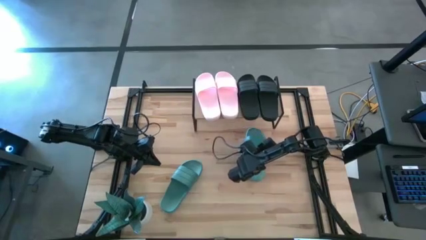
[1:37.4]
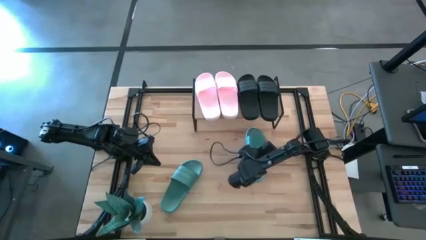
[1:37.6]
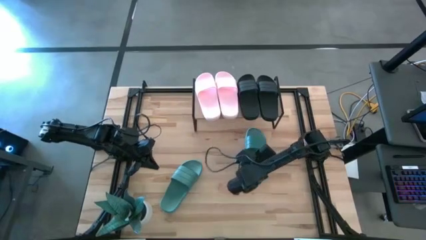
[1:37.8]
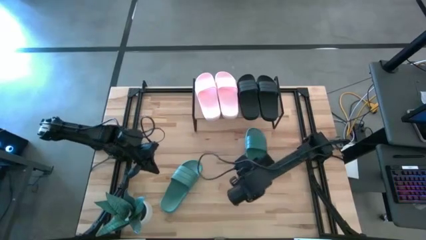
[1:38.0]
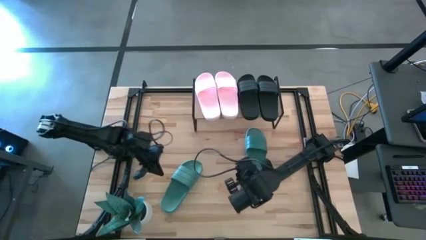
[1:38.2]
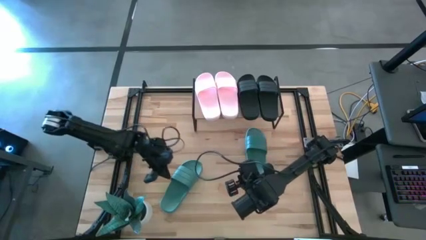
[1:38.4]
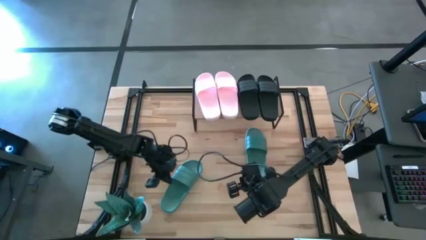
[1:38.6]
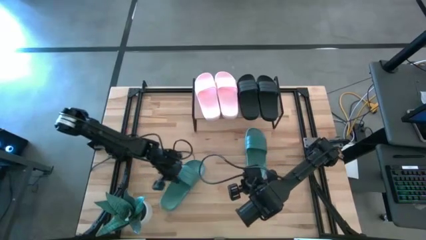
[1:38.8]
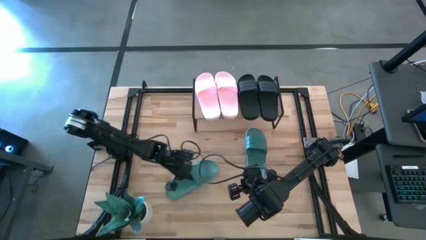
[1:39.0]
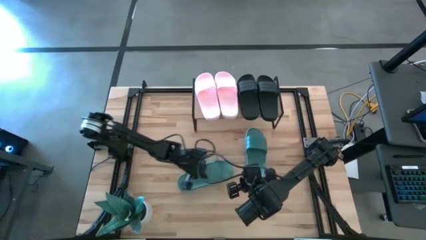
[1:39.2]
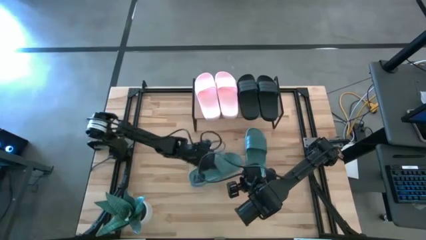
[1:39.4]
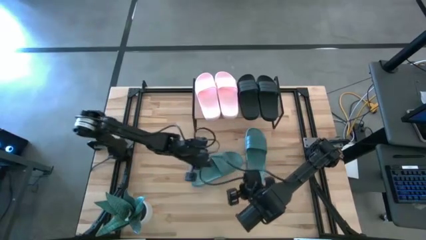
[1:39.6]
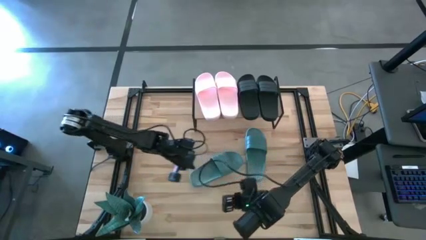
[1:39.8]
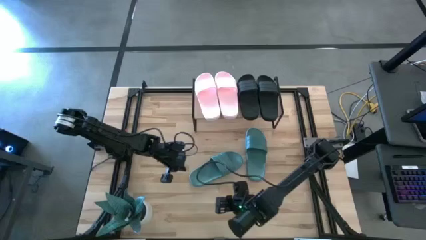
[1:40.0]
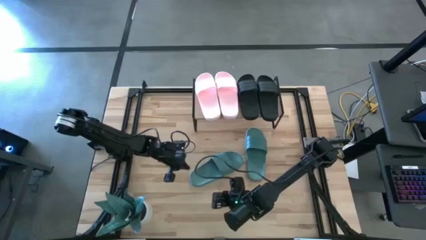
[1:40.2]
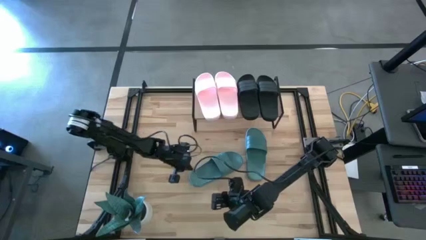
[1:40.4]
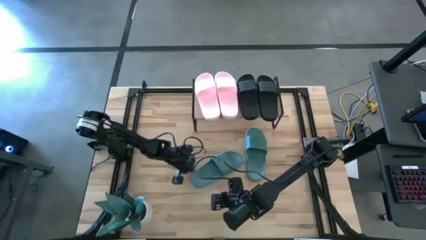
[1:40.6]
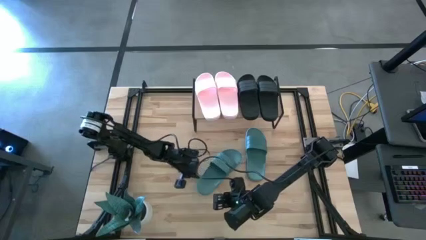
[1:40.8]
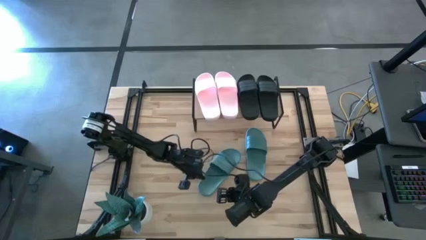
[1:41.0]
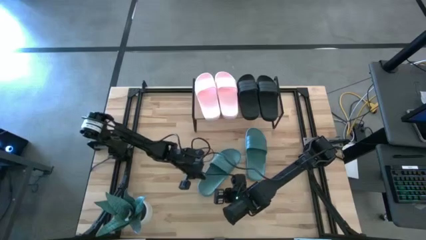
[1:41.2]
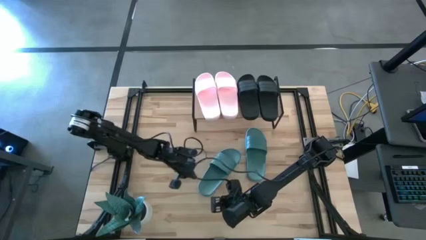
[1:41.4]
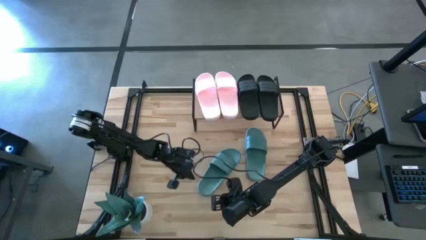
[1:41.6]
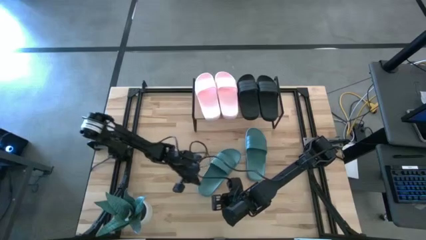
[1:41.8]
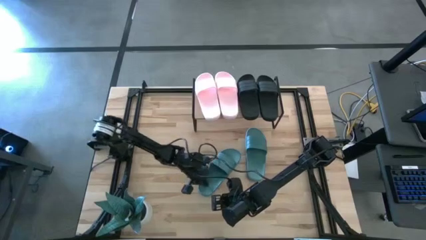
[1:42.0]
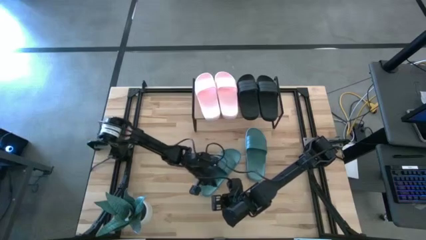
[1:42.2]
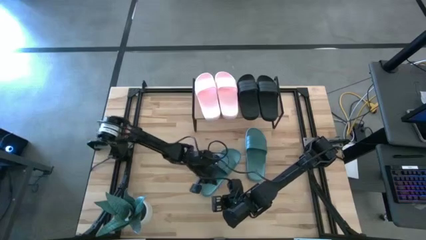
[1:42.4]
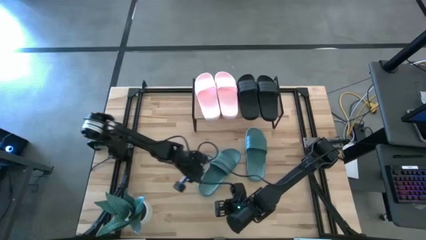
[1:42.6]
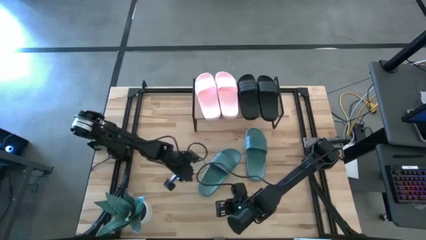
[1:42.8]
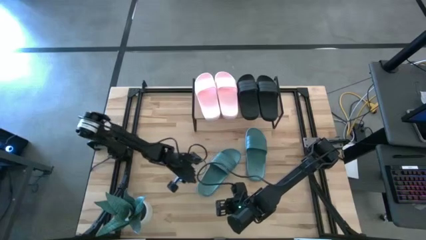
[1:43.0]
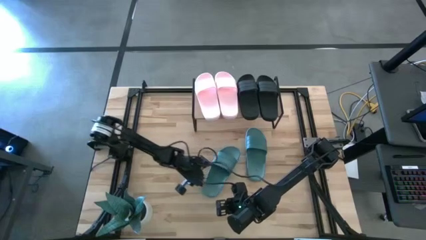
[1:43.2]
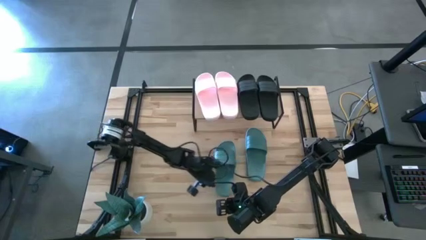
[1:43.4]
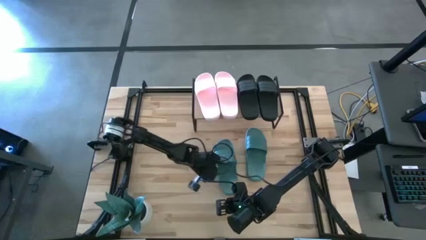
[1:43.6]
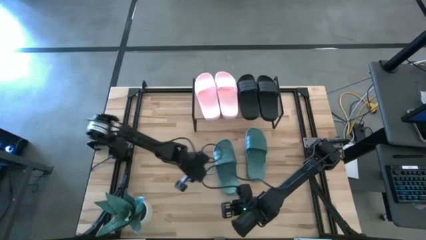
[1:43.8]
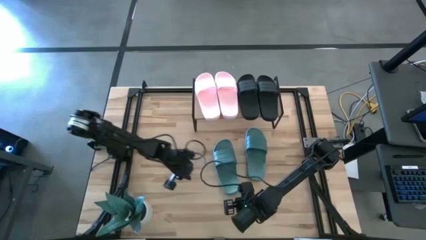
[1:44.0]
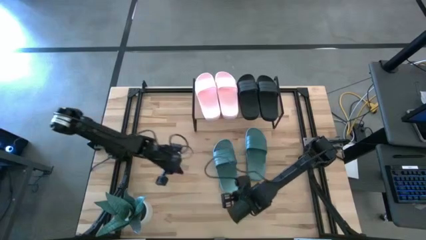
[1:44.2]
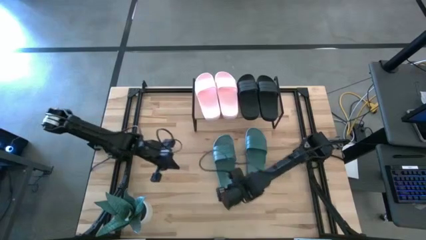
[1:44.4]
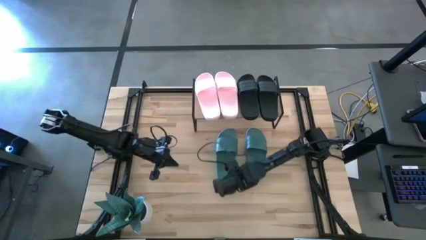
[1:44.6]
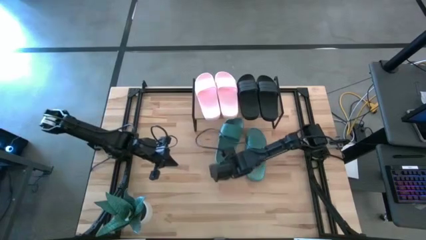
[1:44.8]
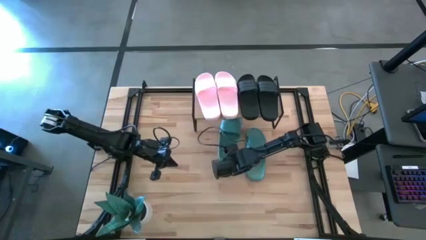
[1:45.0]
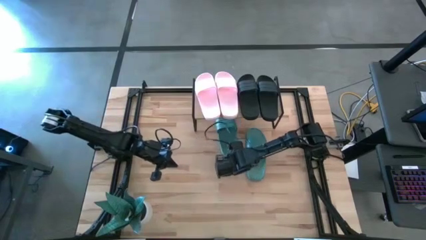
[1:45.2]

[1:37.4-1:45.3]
Task: Pick and place slides into the shelf
Put the left green slipper under the shelf

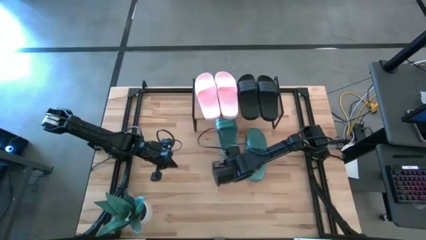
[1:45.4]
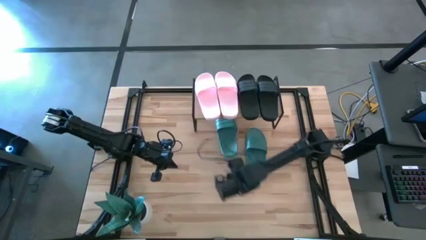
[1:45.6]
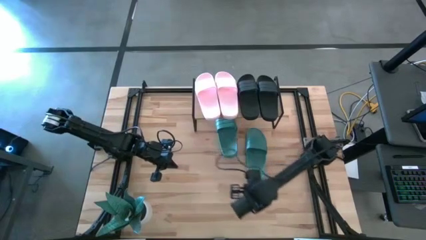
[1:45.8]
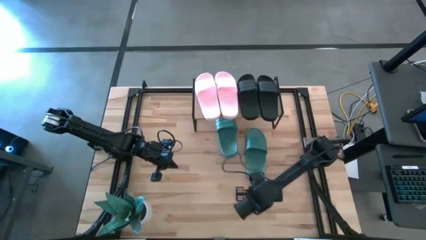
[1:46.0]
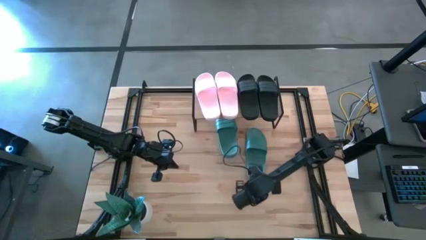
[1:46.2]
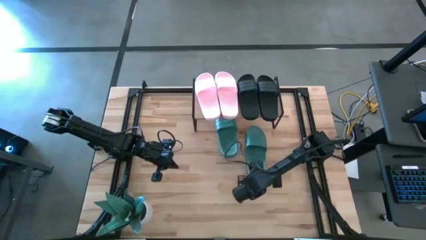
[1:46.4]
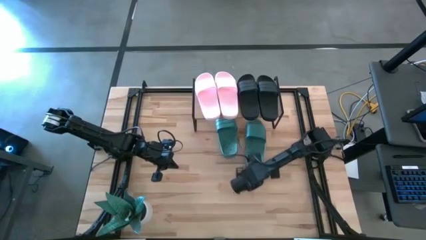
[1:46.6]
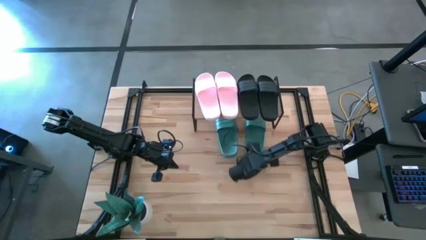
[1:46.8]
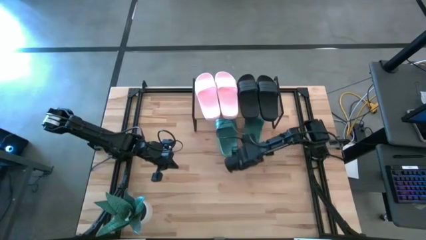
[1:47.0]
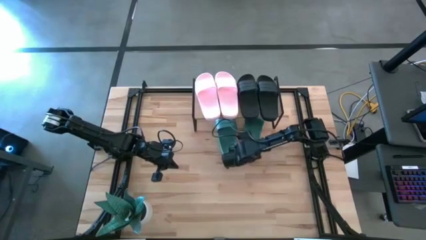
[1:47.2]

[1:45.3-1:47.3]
Put the right green slipper under the shelf
